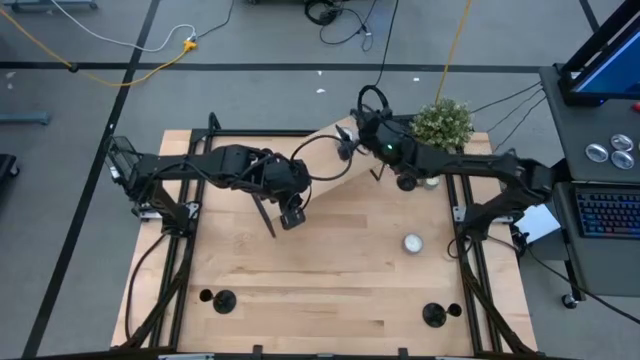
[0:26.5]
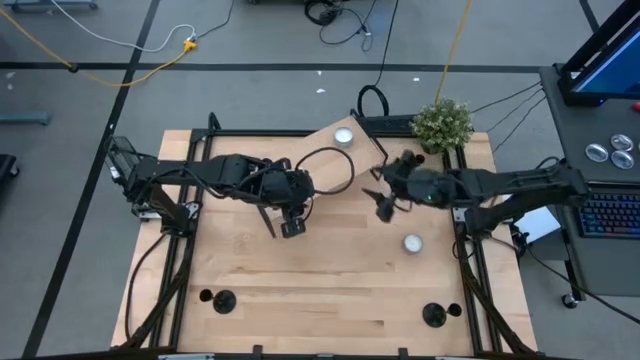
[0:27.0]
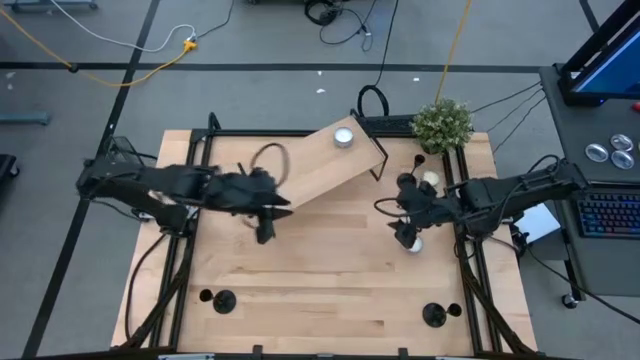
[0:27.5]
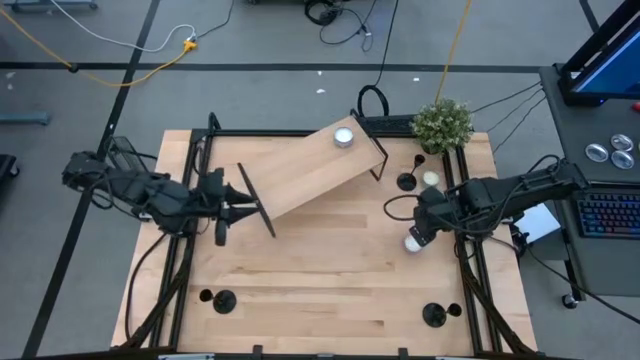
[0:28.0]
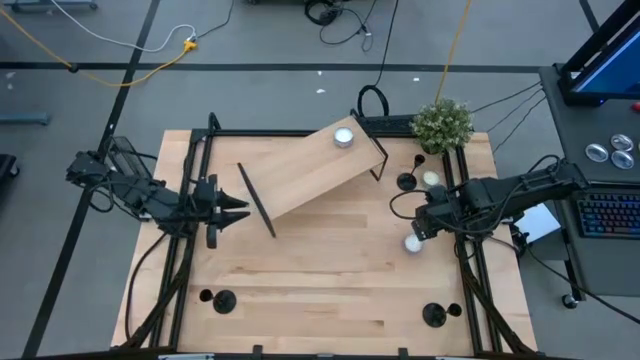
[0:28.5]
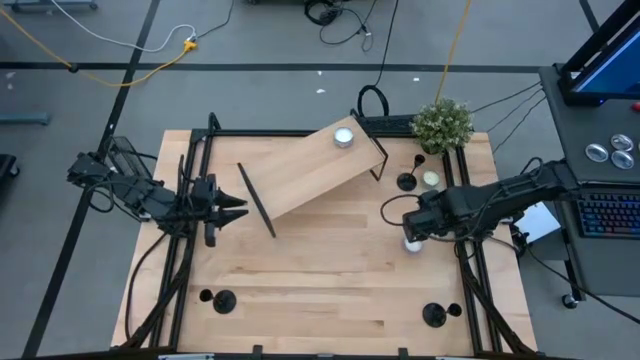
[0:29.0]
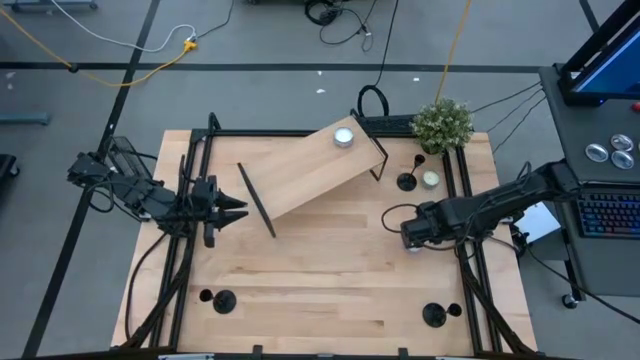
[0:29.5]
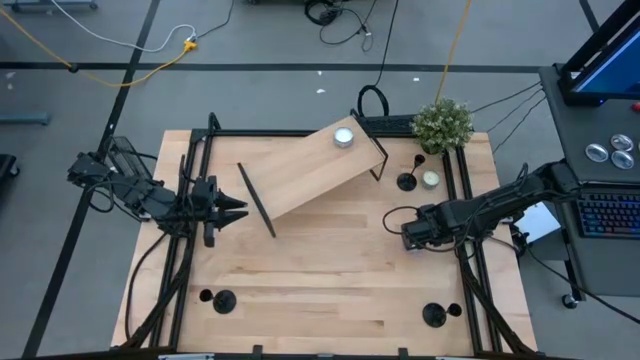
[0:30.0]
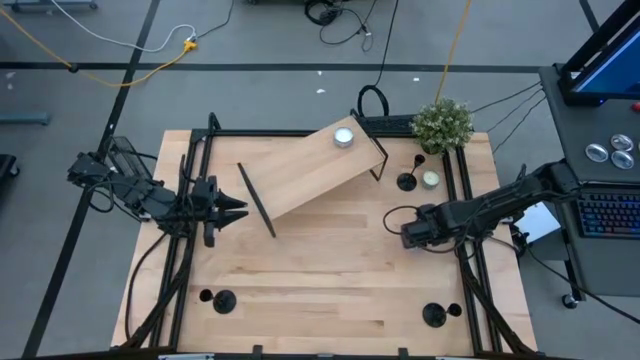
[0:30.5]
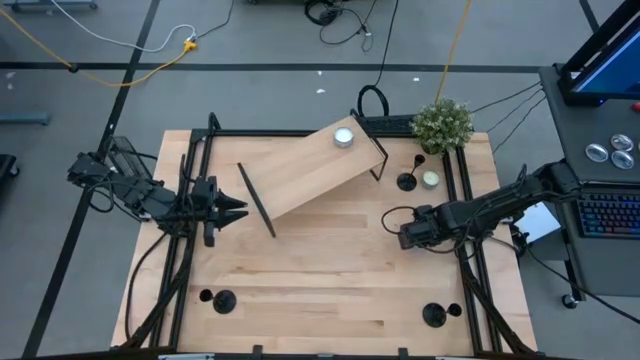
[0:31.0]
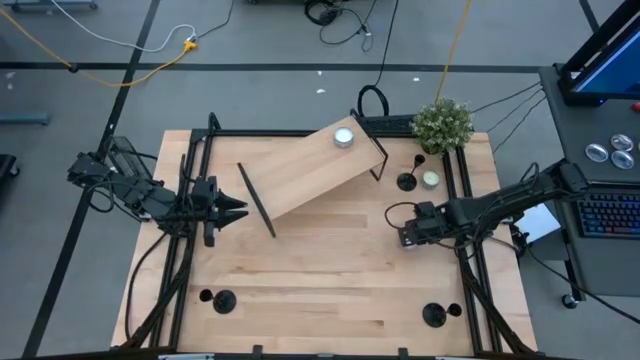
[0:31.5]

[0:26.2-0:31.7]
Task: Pick & Place candle stick holders
Put the violet scented candle on the shelf

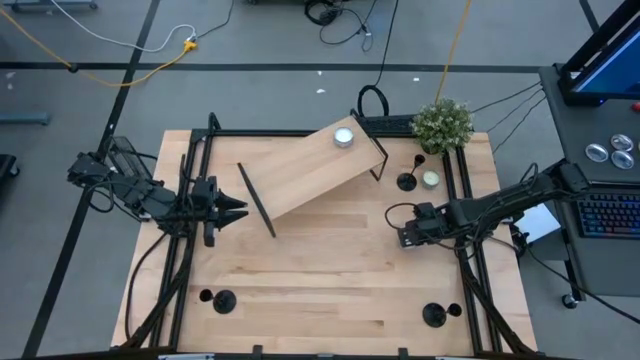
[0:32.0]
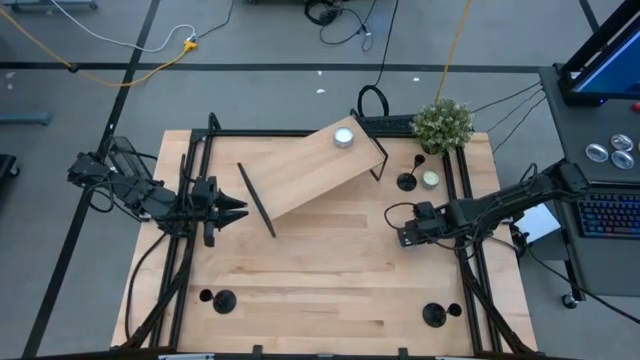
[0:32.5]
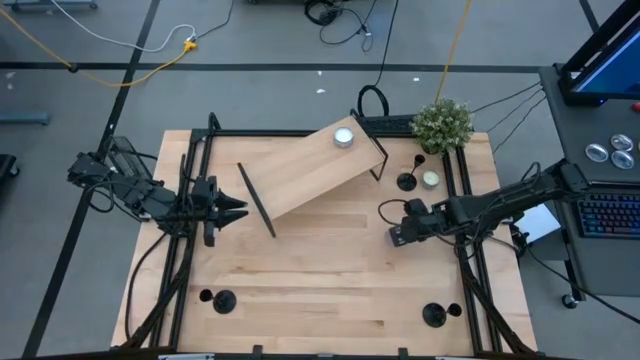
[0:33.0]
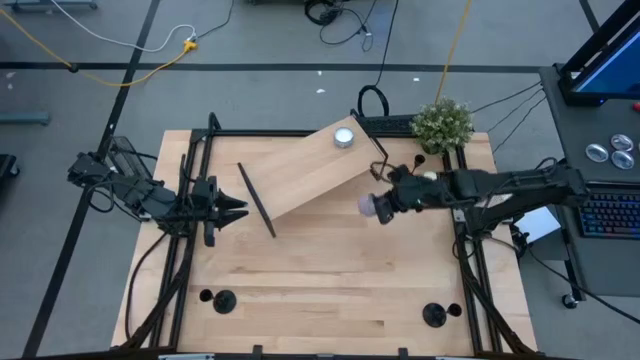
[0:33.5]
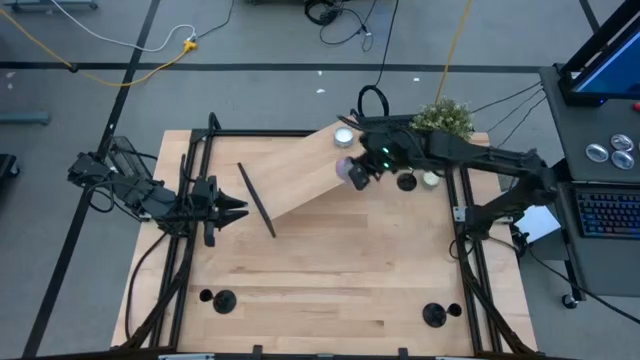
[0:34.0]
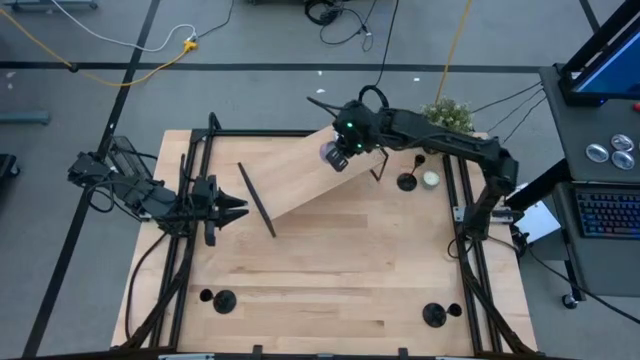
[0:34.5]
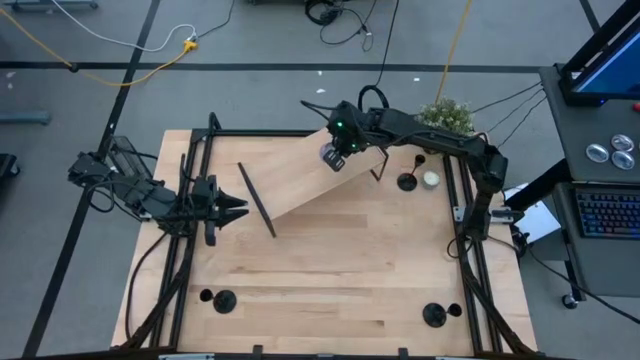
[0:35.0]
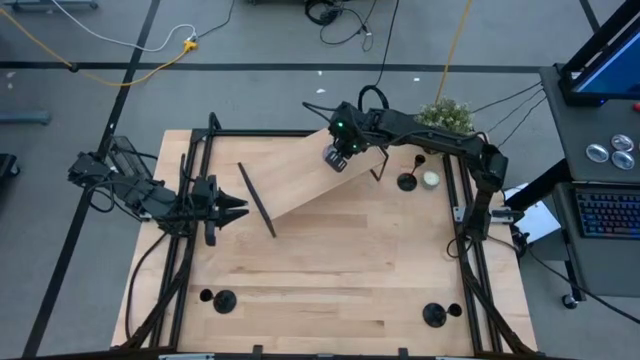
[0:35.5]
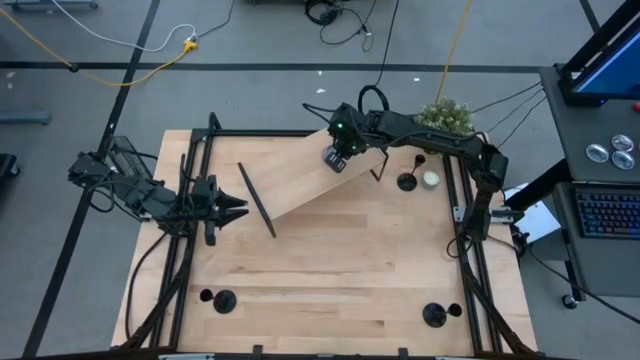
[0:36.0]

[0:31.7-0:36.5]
Put the violet scented candle on the shelf
